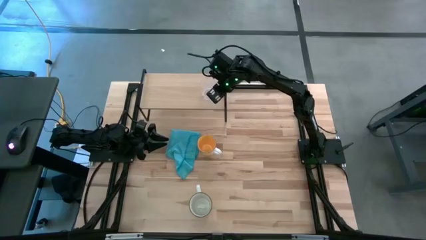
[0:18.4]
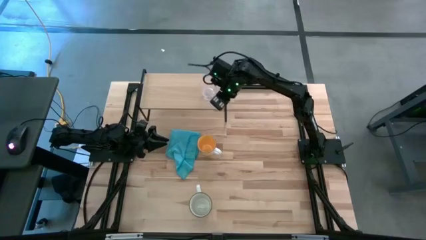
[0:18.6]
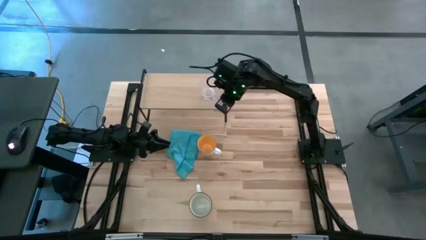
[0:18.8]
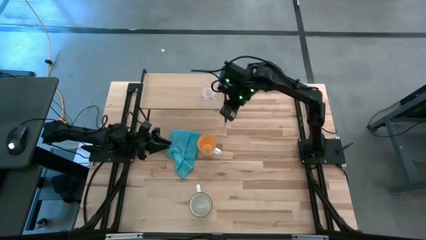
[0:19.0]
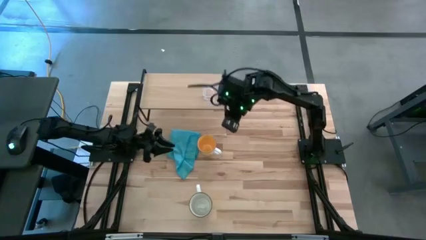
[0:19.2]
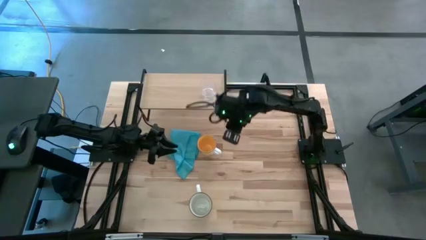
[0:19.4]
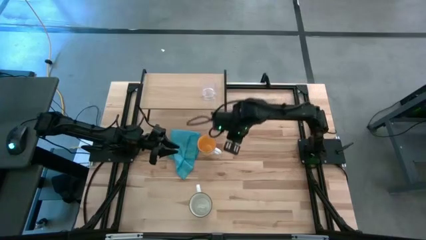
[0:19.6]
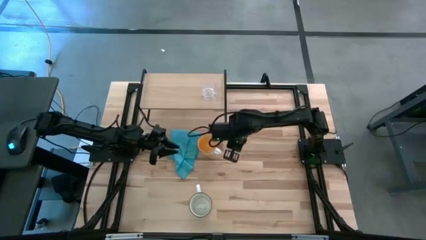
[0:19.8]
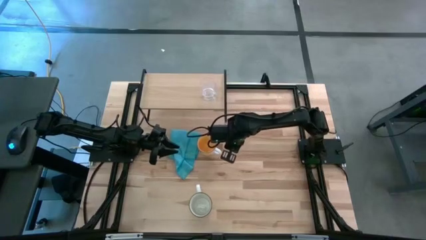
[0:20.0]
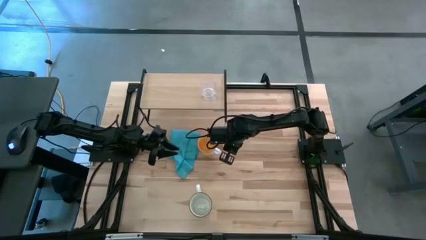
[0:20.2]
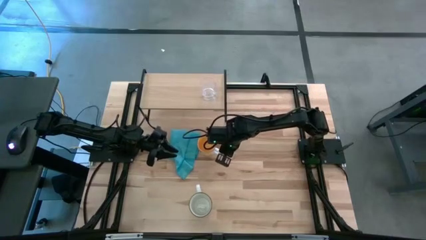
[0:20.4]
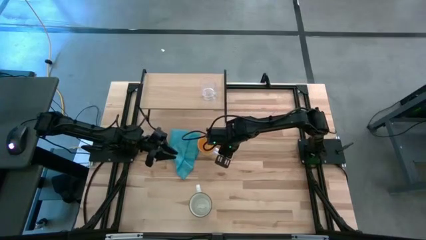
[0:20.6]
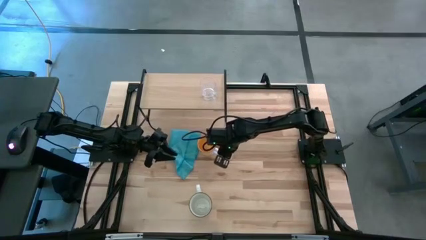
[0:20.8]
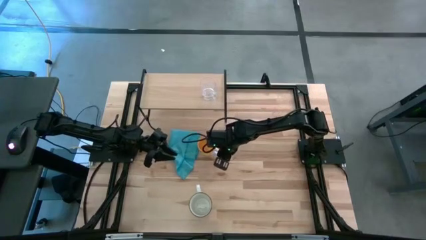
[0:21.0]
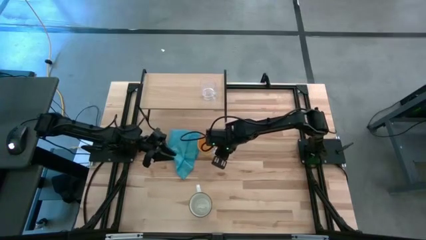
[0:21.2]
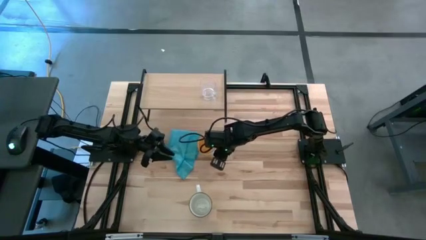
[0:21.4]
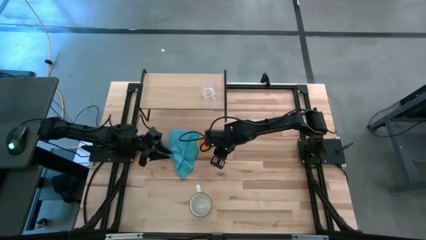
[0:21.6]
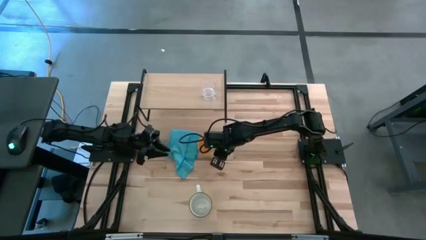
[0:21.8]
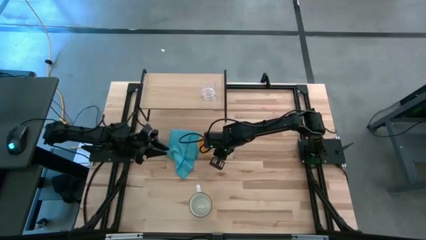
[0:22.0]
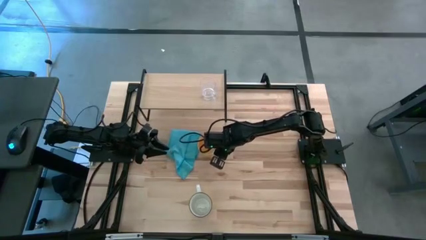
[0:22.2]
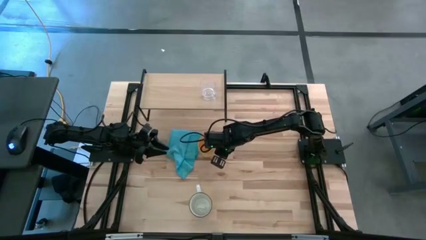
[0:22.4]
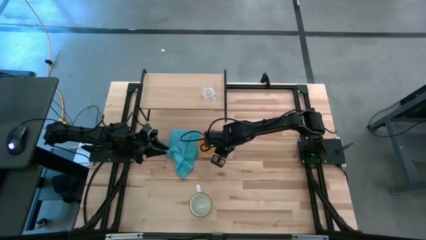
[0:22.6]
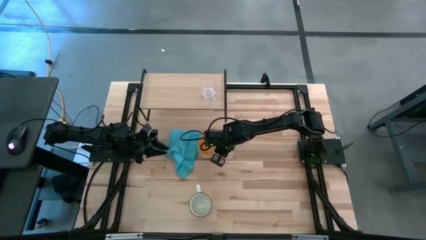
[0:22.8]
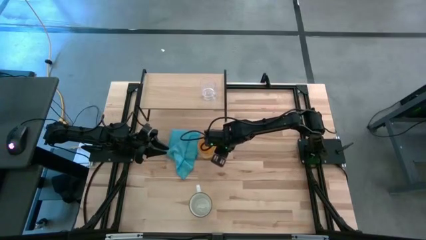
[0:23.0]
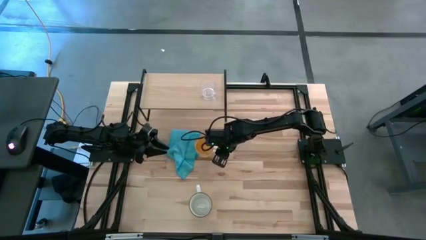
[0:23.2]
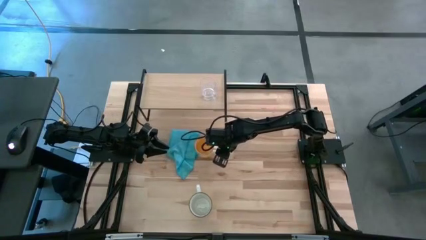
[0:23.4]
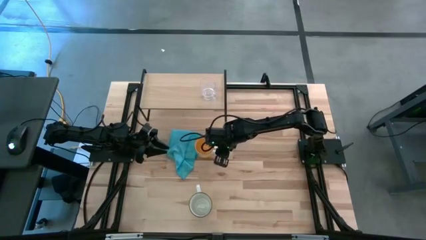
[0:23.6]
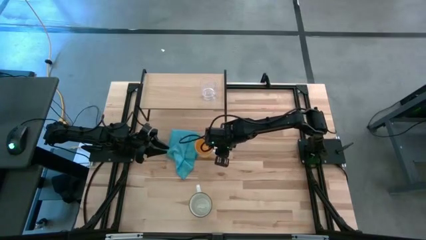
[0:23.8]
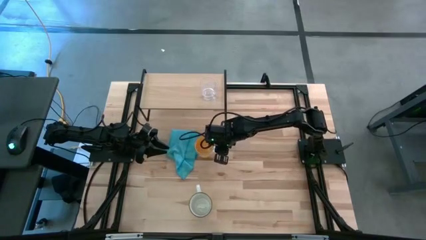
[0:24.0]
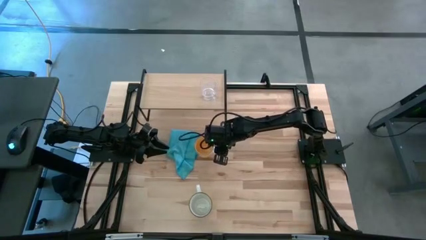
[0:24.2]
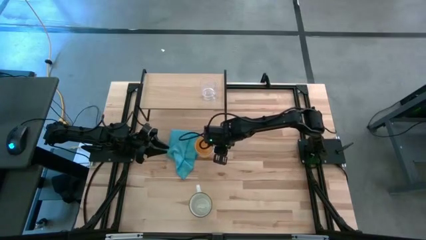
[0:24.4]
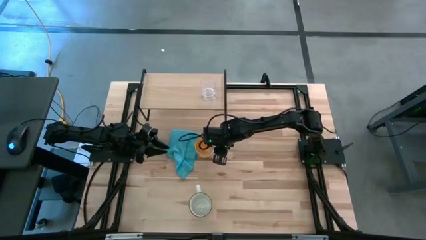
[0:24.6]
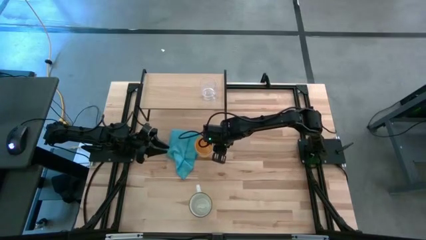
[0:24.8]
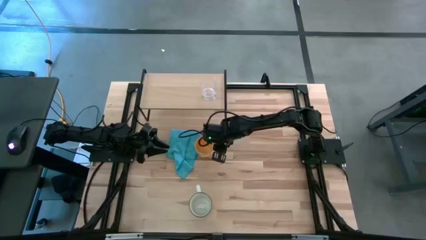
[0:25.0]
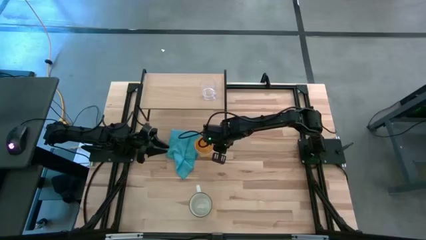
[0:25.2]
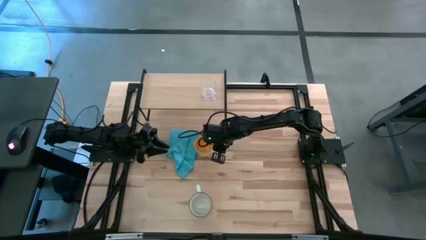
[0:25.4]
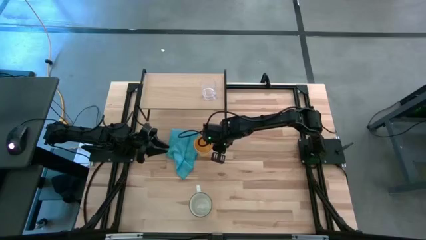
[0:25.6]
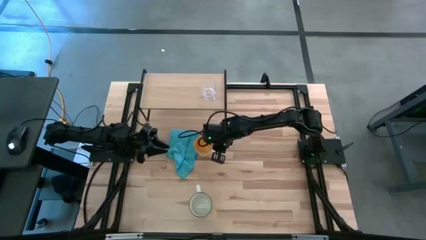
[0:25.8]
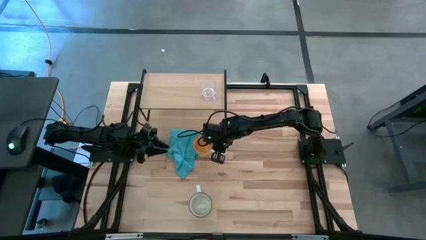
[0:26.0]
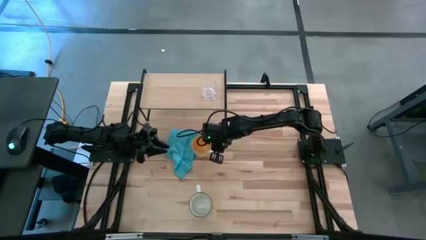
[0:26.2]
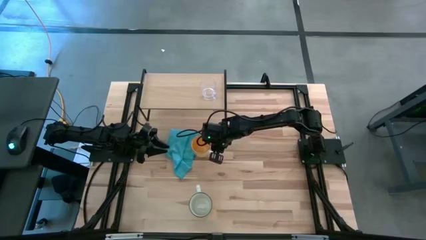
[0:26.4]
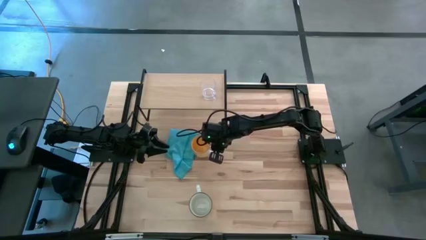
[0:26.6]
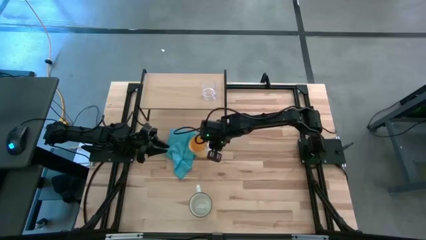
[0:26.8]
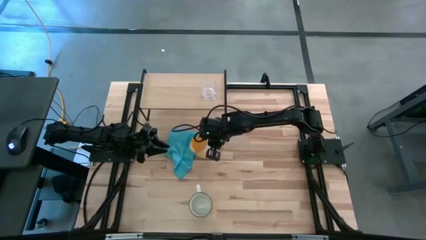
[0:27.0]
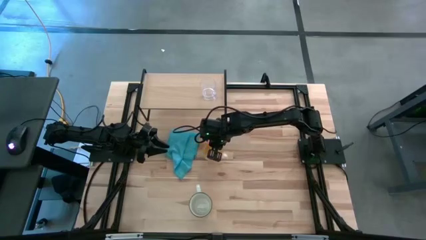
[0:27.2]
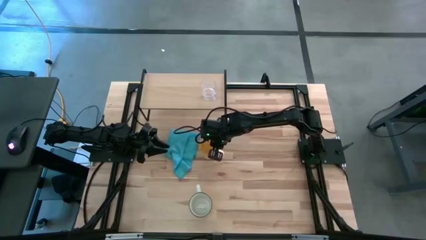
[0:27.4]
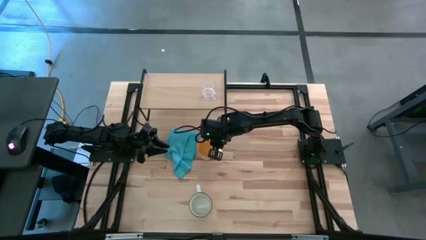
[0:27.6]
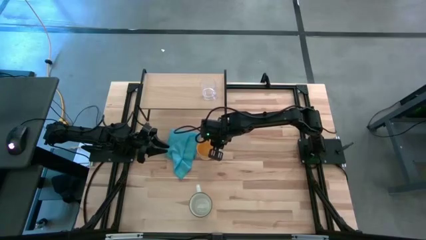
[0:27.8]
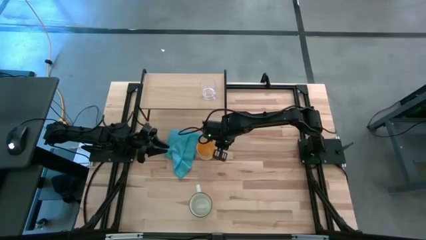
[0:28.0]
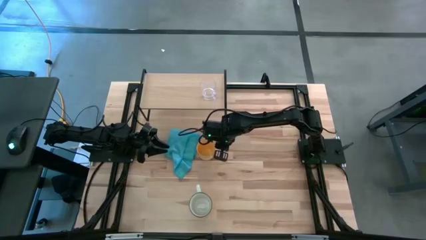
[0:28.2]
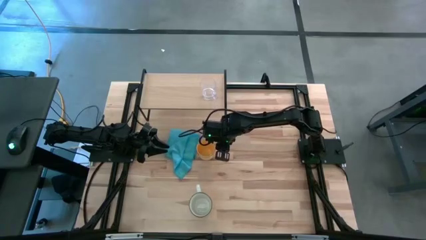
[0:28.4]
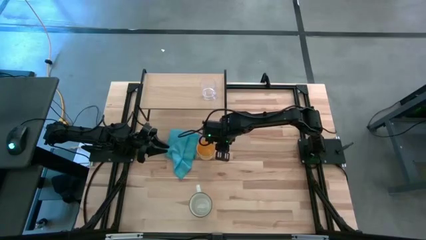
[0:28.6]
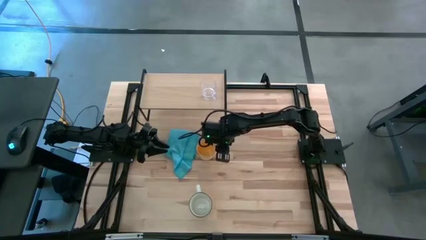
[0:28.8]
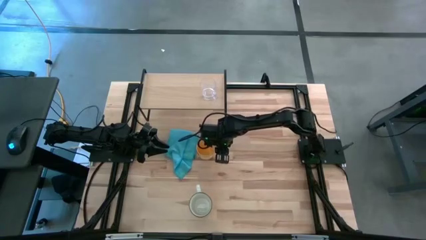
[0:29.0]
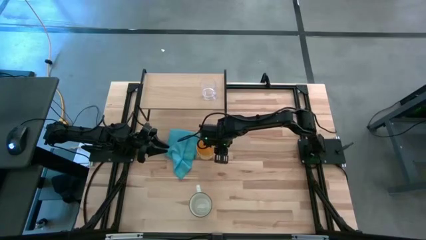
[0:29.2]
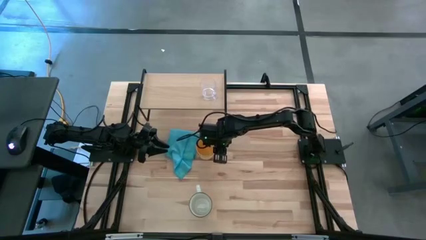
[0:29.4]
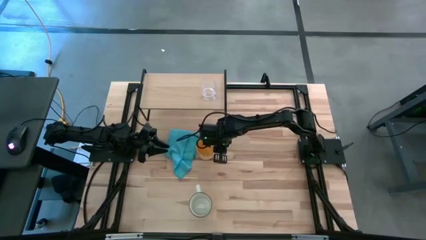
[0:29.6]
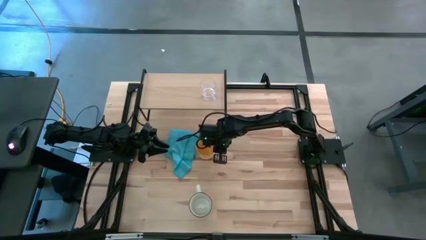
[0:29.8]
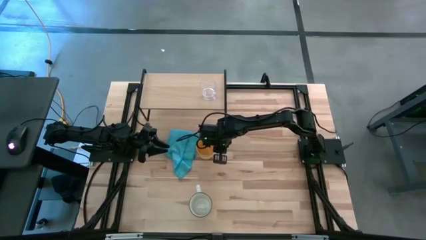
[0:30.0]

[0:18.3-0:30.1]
Task: Stack small to large cups/mugs on shelf
Put the yellow mug on the shelf
